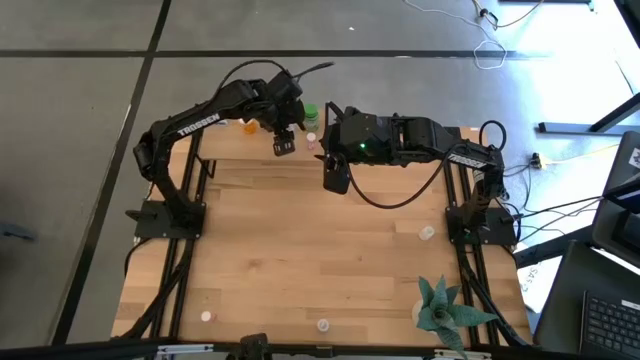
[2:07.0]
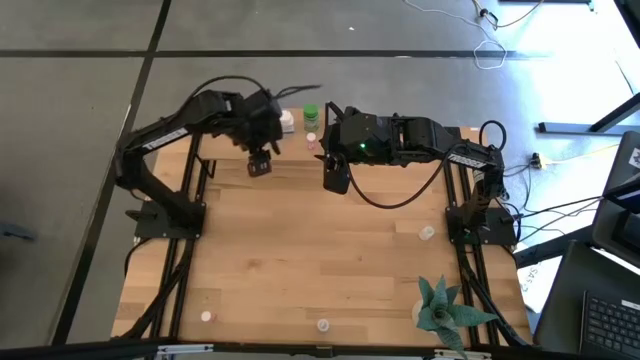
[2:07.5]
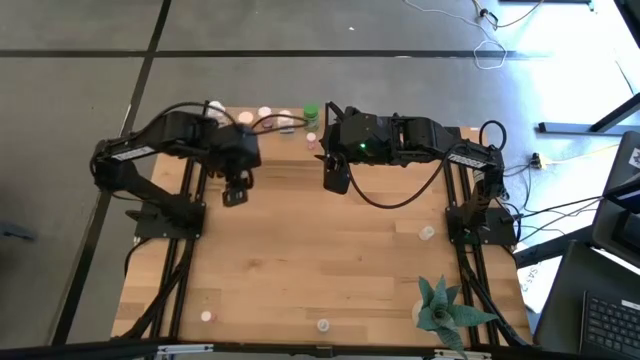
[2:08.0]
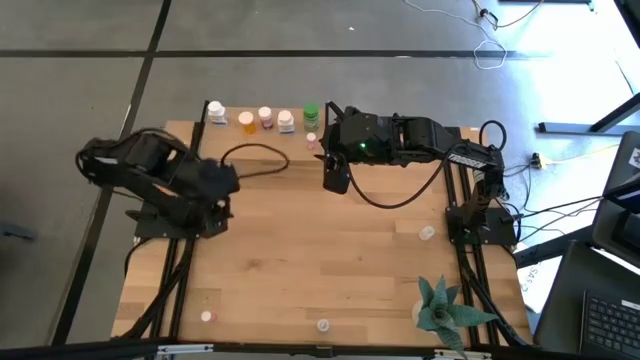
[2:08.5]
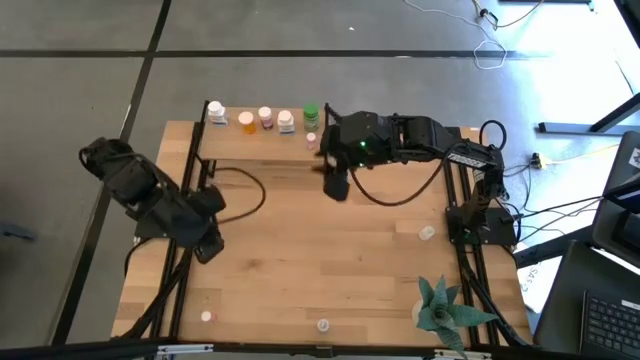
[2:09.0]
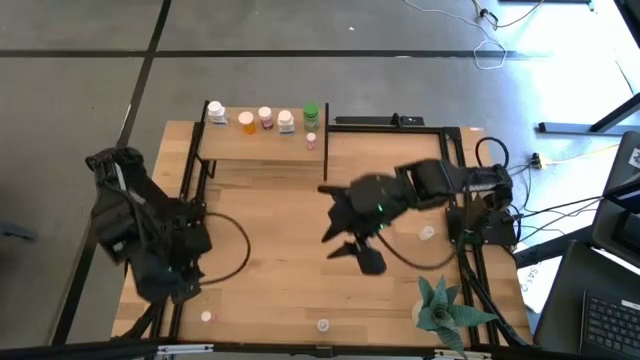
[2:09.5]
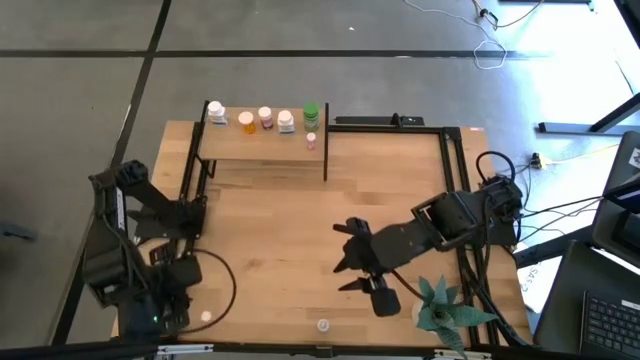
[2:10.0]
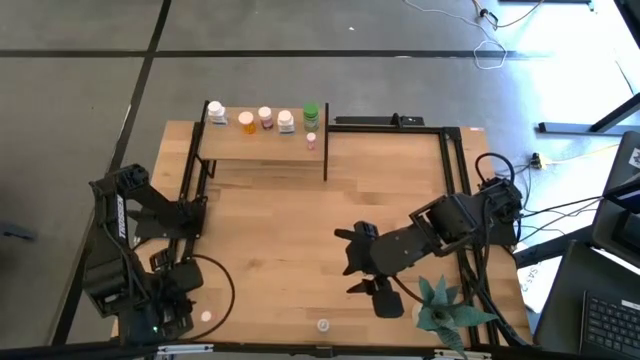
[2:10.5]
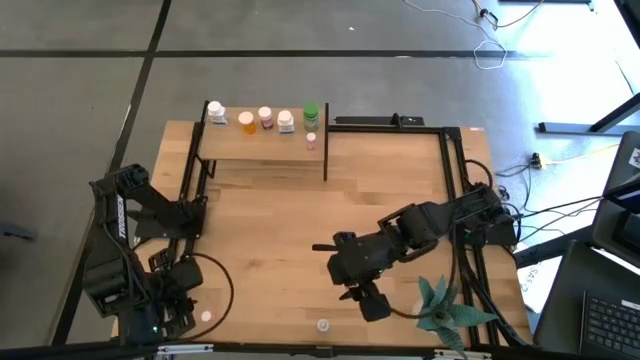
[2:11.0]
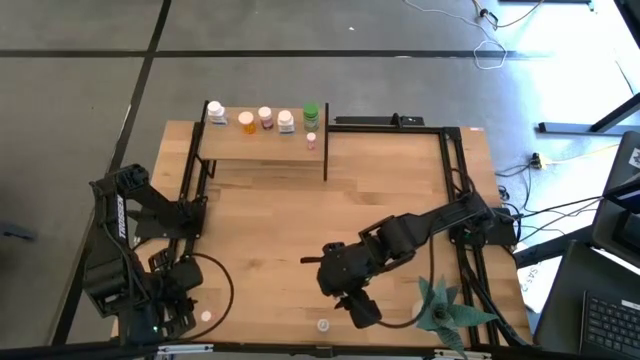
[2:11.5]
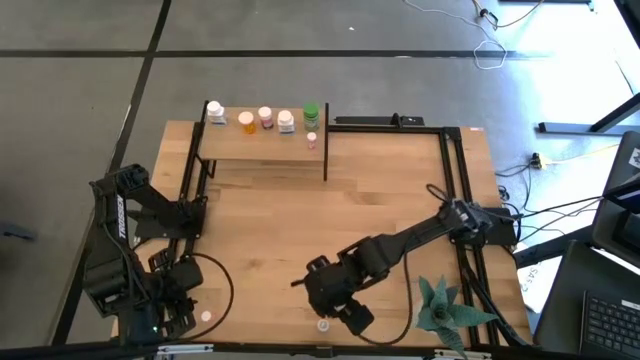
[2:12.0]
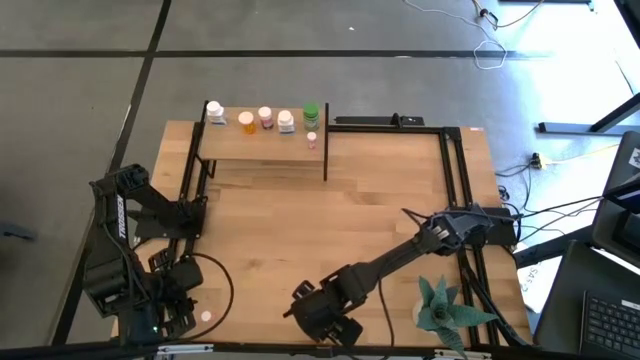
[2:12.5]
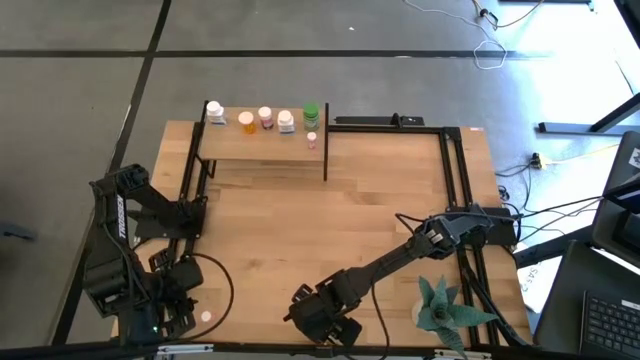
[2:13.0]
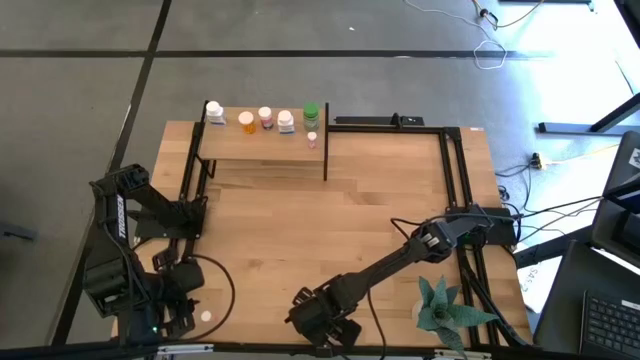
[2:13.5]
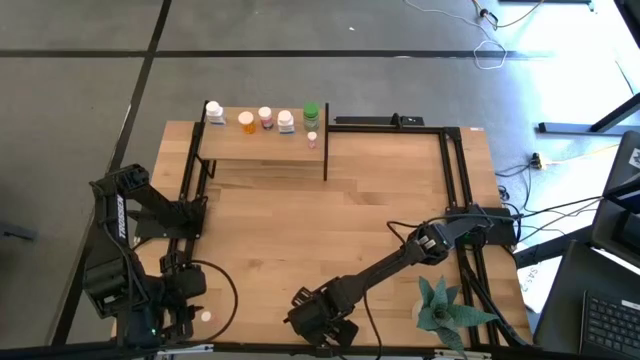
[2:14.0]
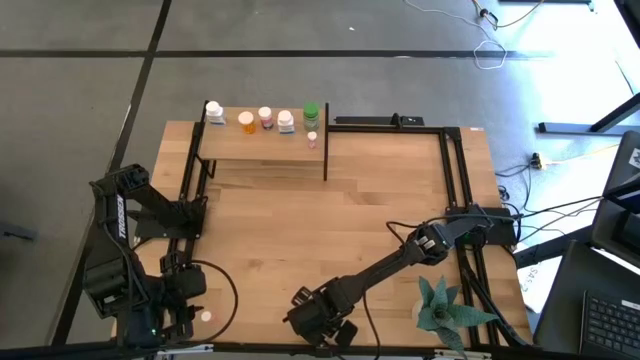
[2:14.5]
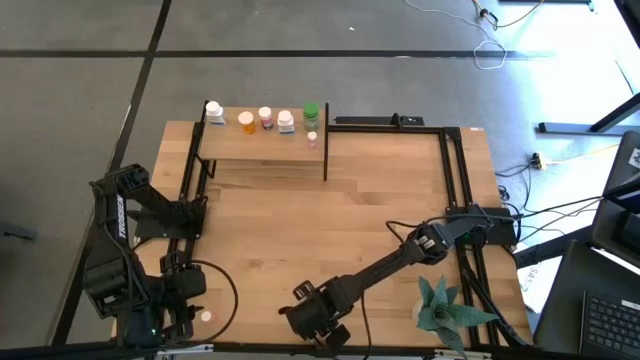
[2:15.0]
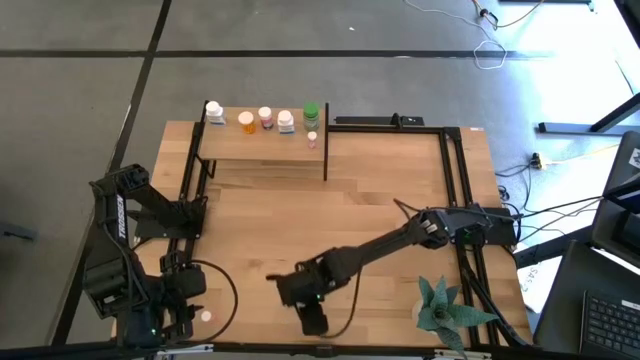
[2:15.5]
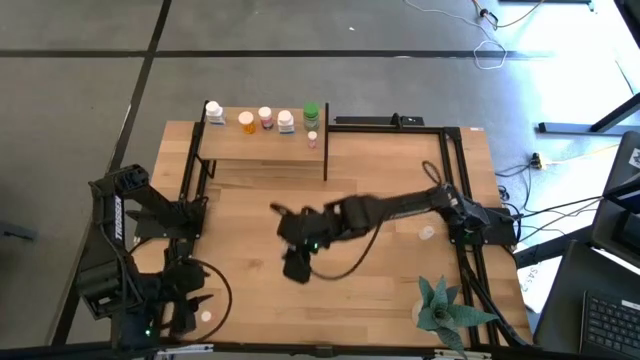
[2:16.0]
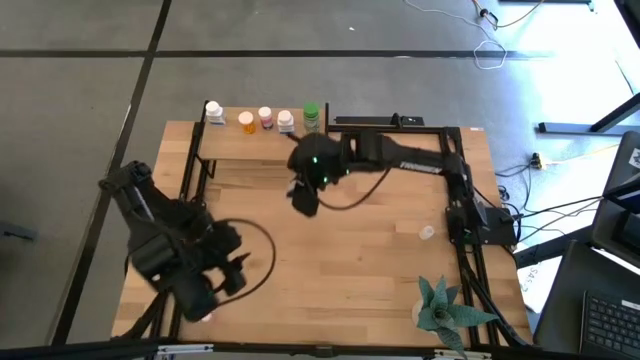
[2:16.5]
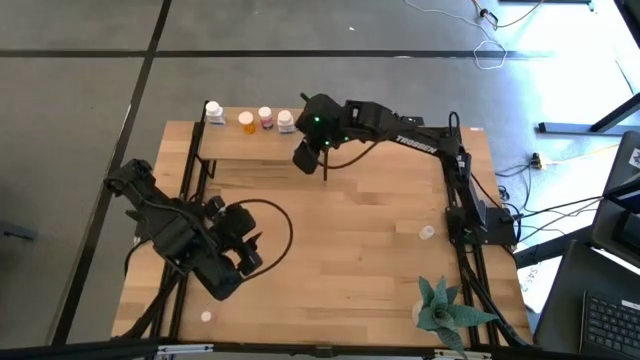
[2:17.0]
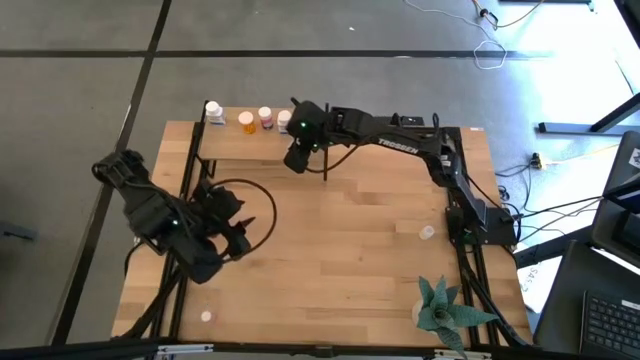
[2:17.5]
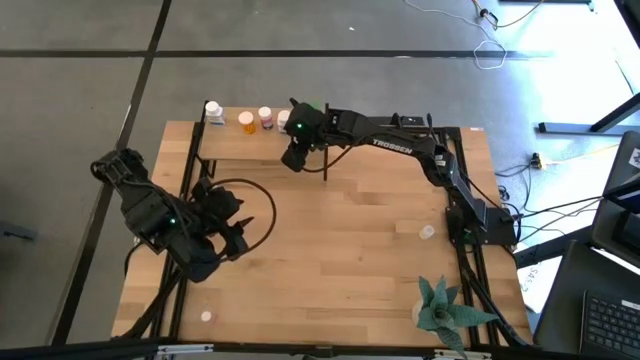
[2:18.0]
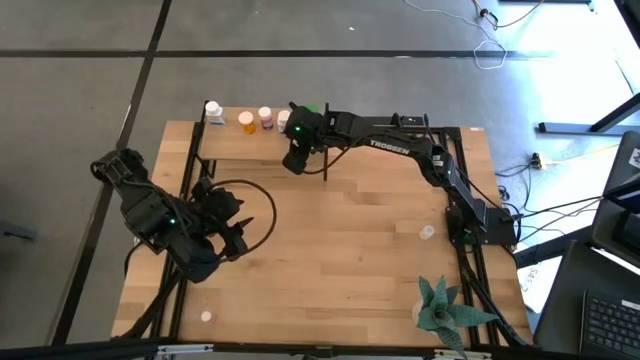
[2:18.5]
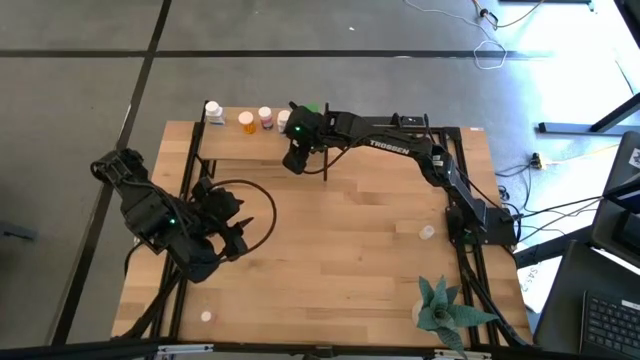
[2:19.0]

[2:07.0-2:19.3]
Task: Pick and place medicine bottles onto shelf by color
Put the bottom transparent pill bottle on the shelf

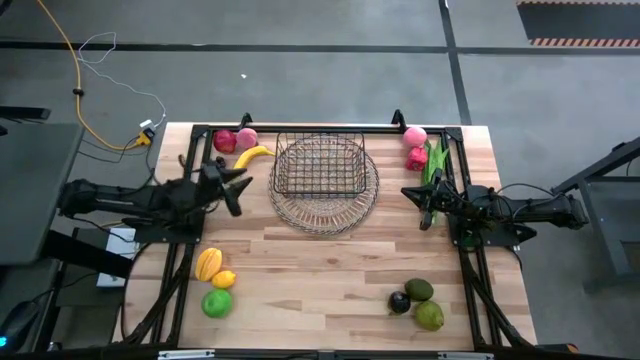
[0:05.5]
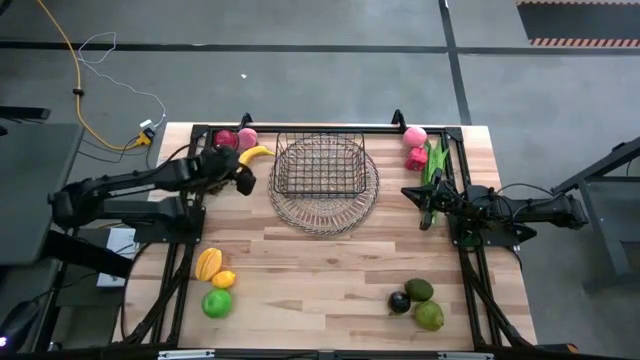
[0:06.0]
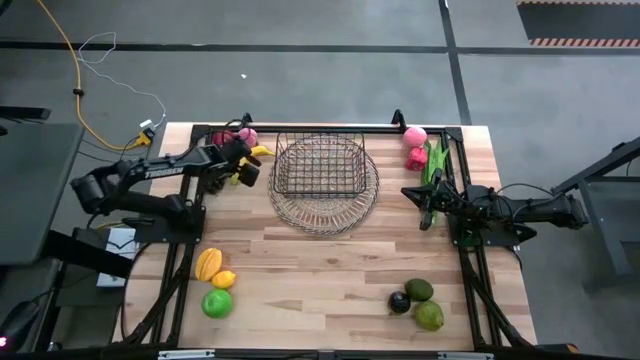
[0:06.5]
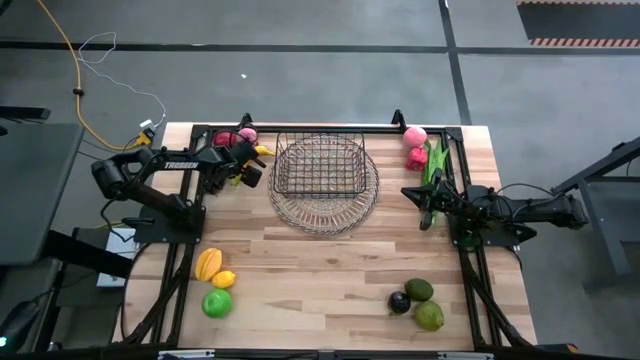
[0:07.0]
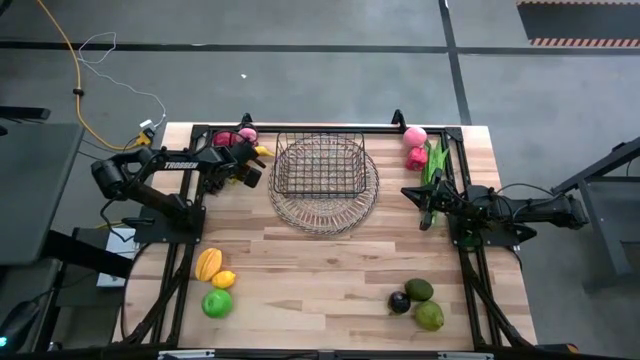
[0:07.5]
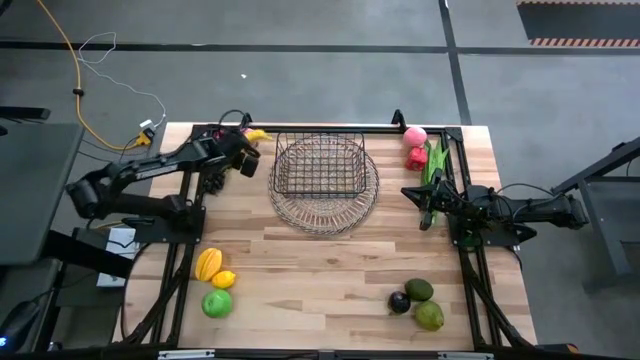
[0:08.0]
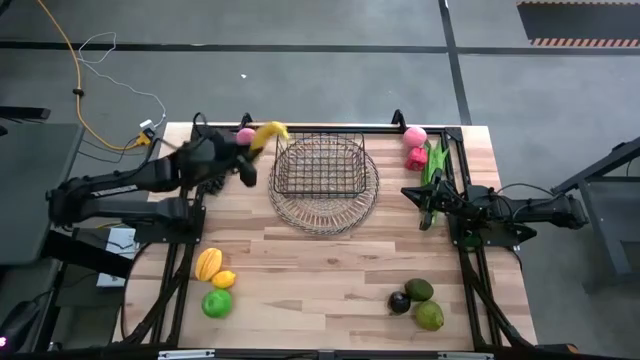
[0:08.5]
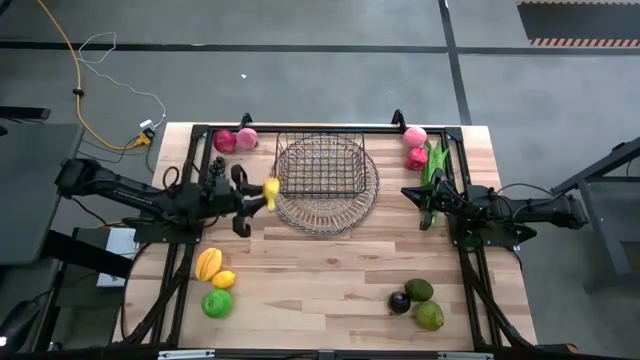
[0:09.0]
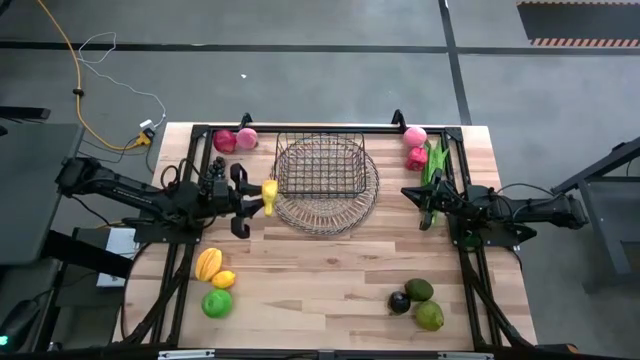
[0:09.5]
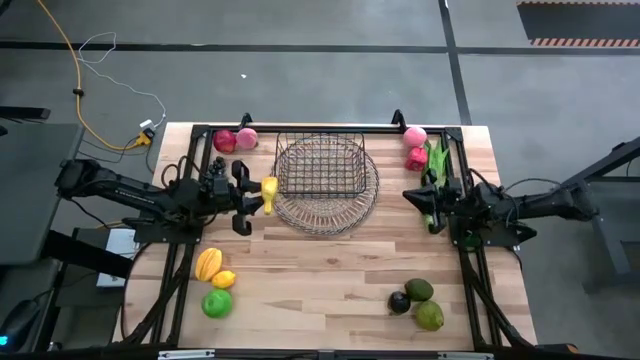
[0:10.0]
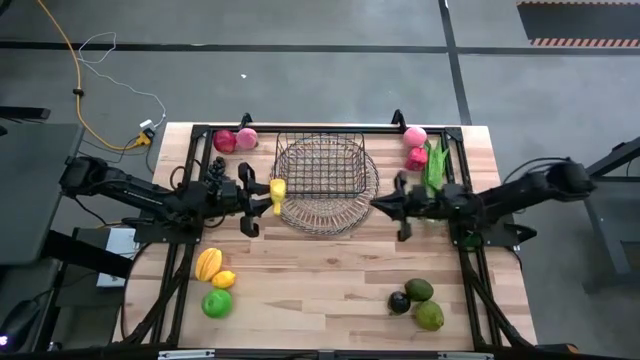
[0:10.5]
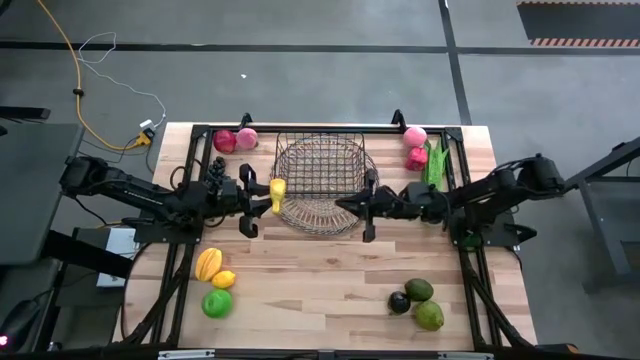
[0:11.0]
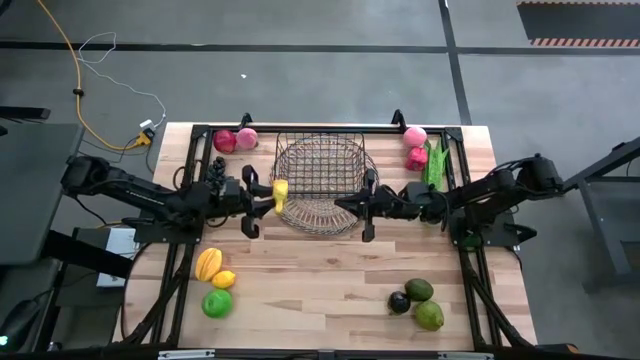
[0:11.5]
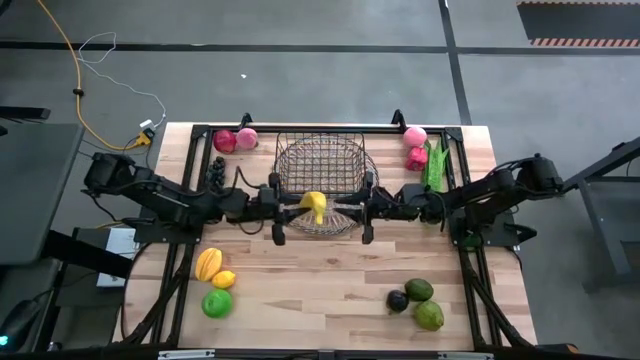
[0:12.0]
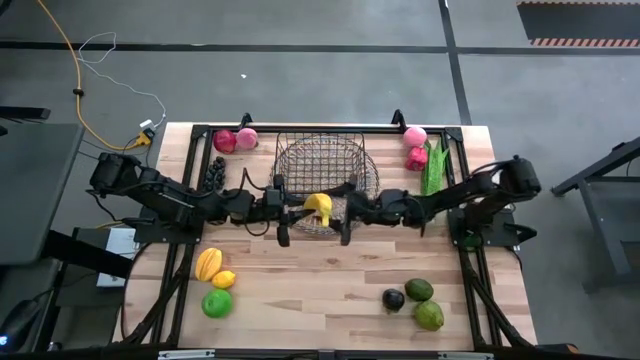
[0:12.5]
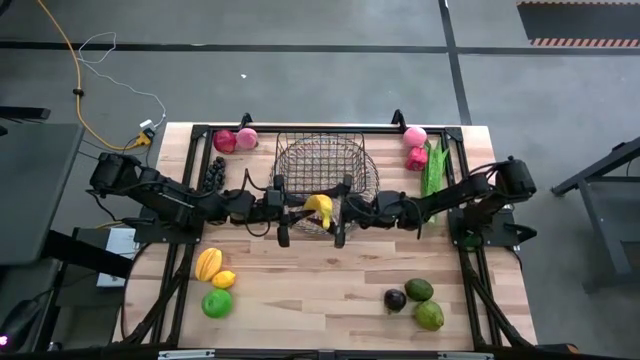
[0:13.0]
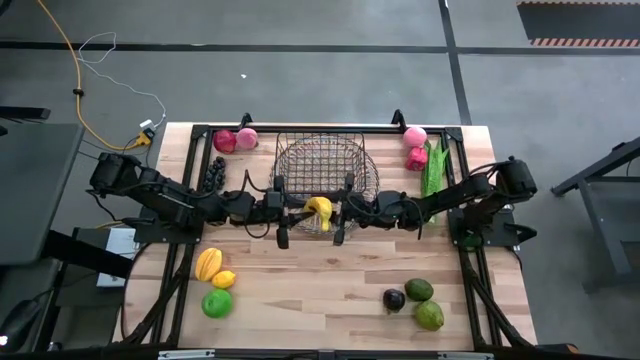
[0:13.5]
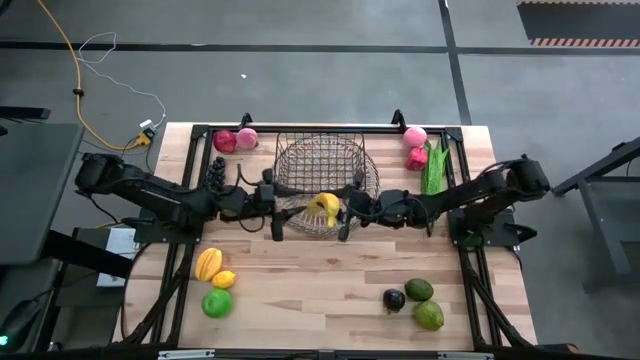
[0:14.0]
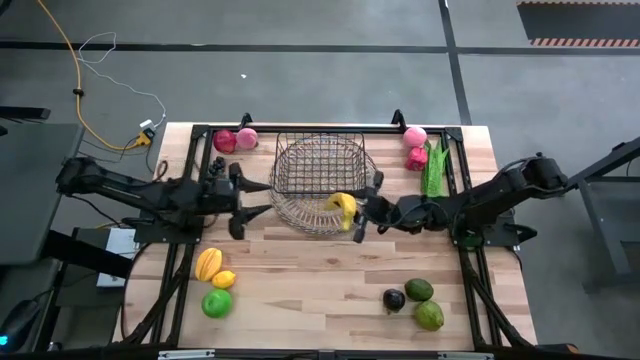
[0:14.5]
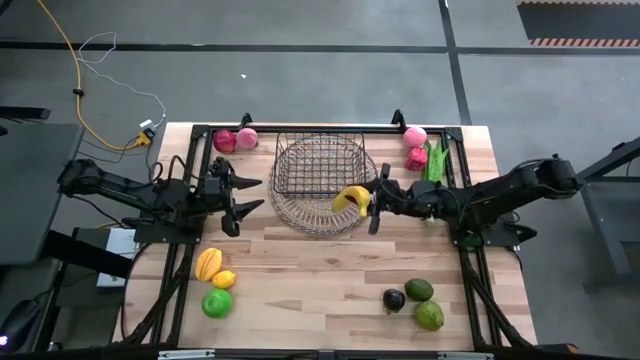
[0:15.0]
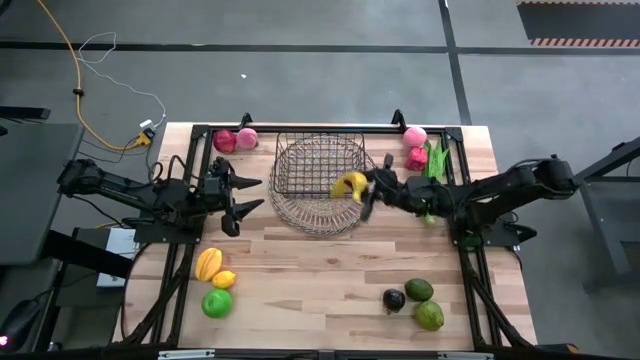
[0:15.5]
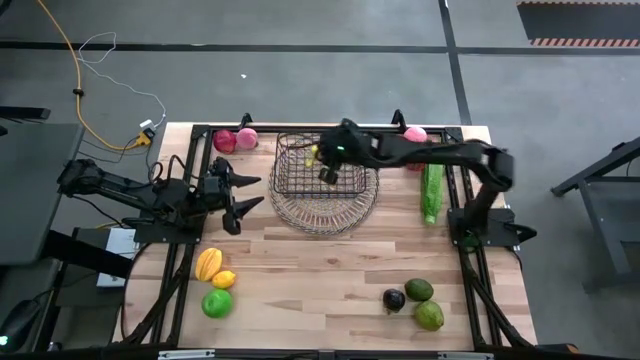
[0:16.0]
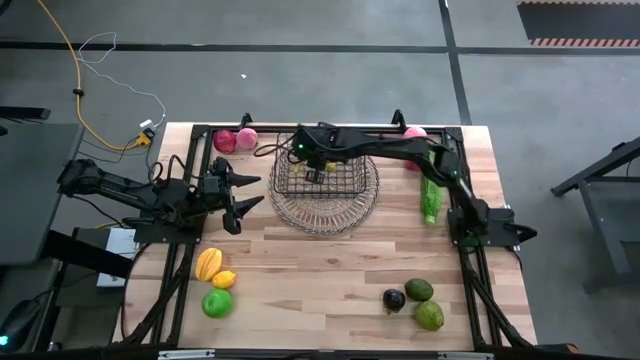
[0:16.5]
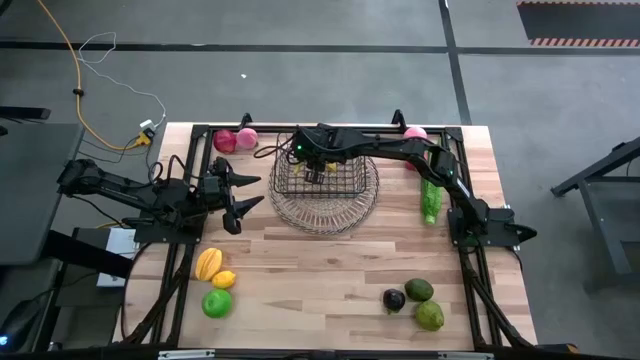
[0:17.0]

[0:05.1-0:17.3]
Task: Build produce basket
Put the banana into the wire basket
